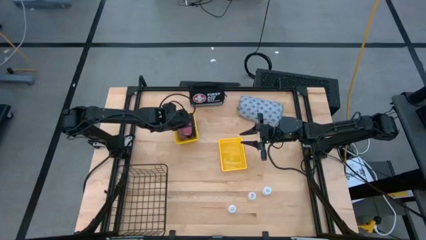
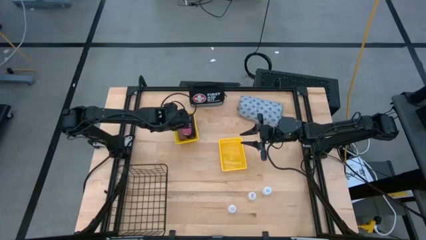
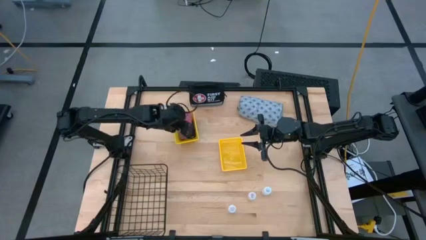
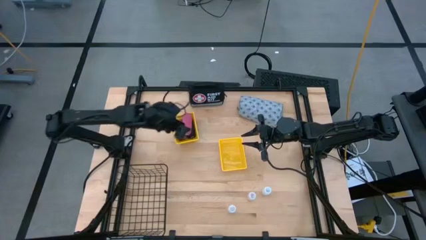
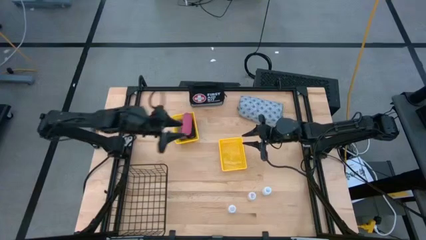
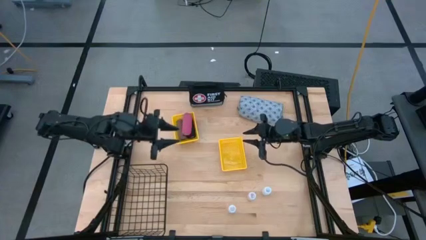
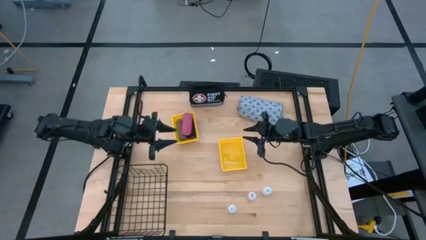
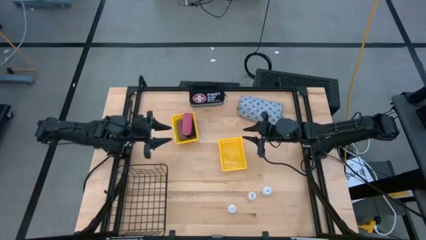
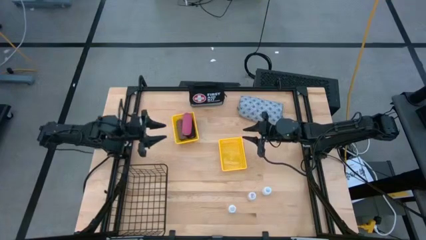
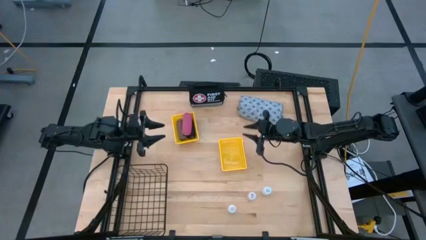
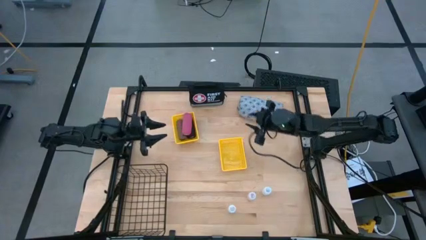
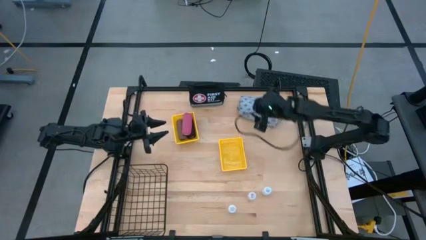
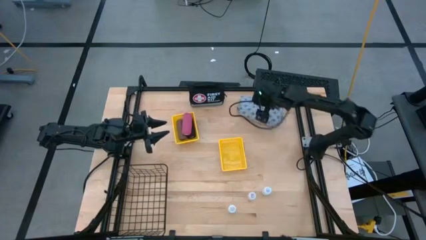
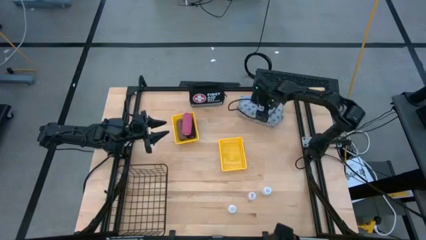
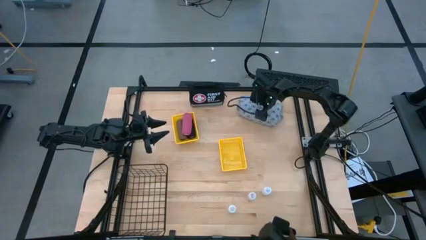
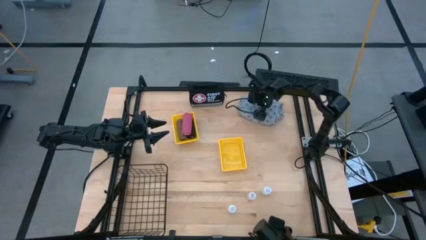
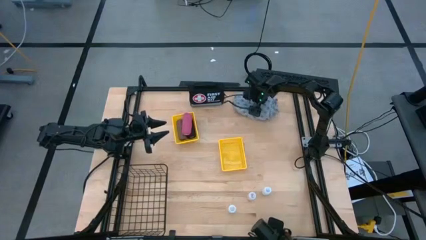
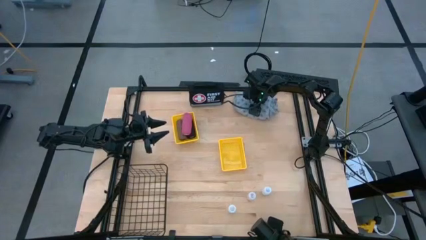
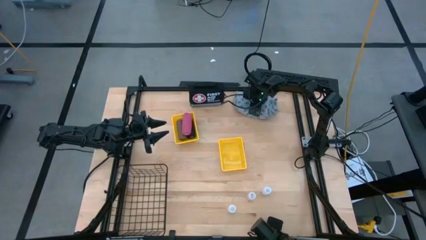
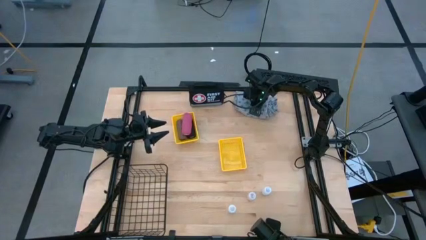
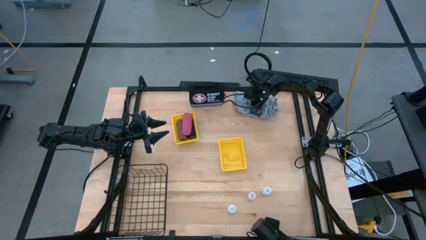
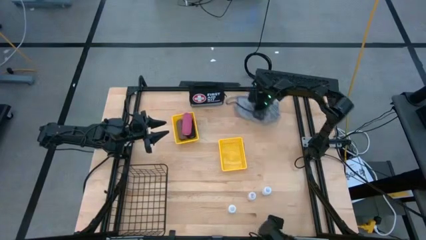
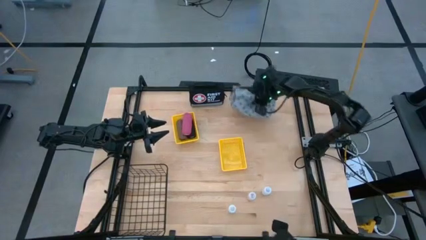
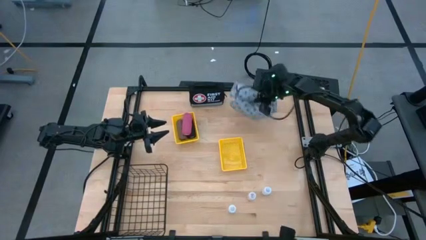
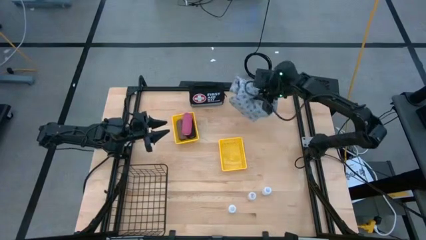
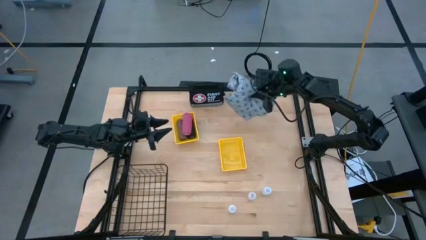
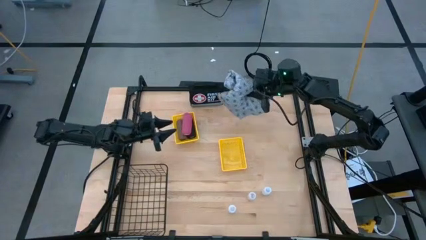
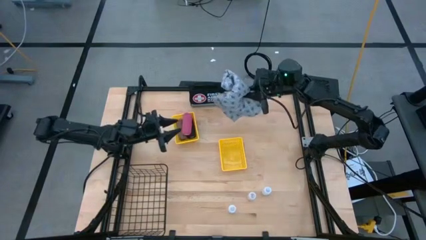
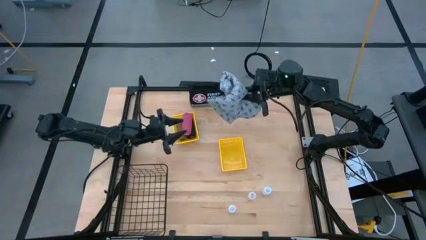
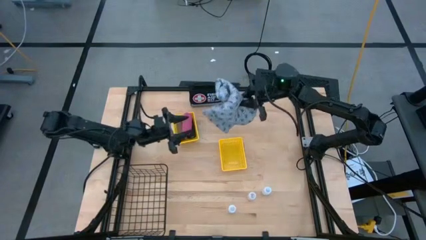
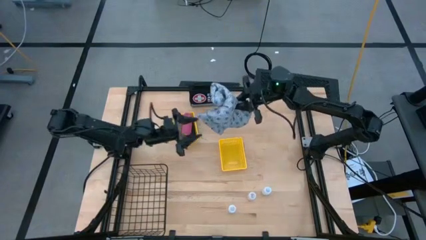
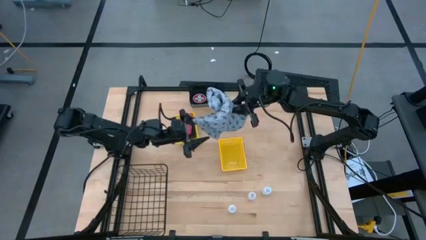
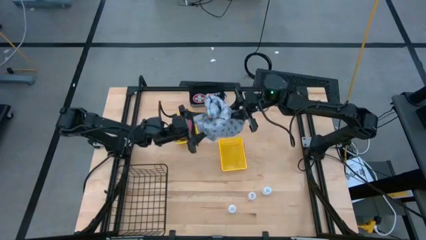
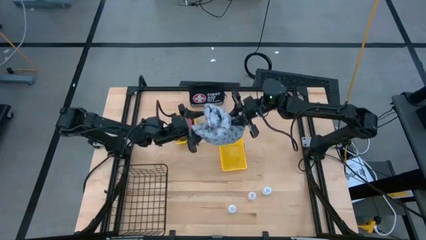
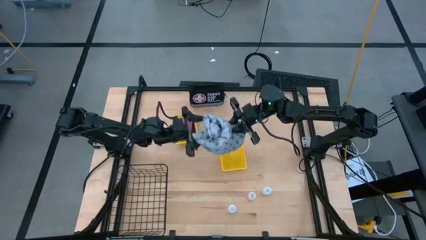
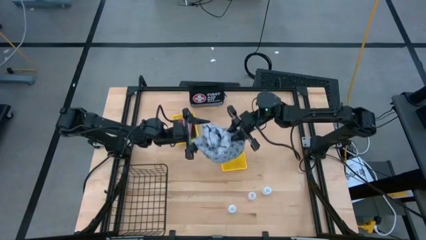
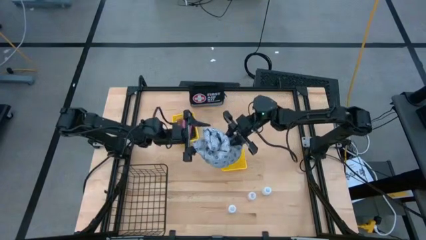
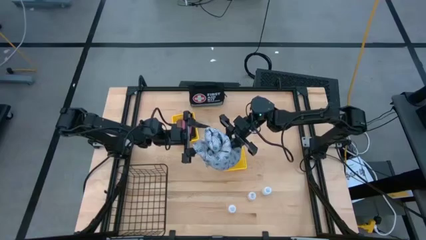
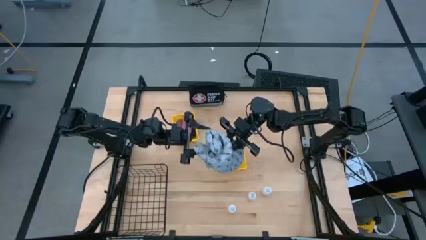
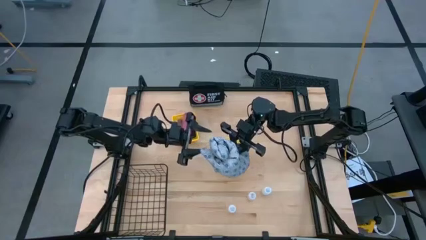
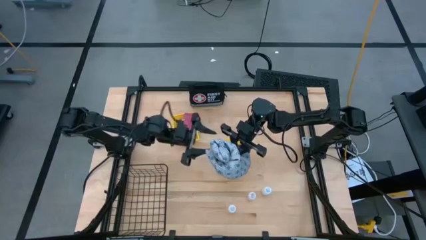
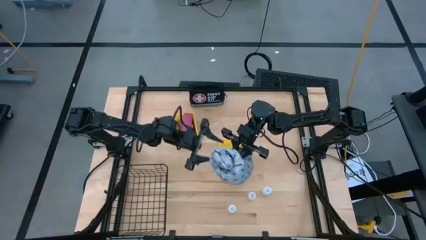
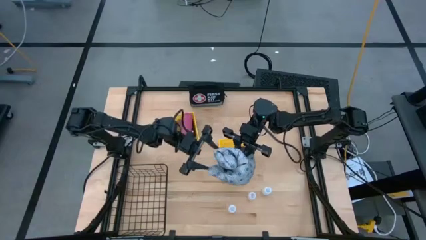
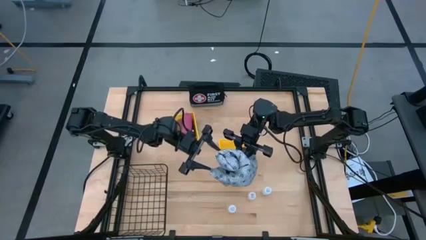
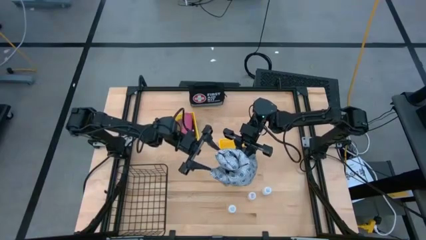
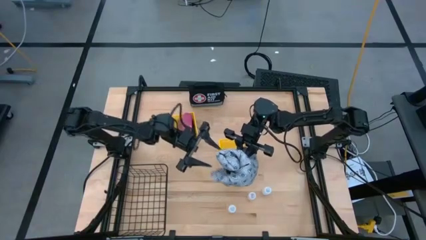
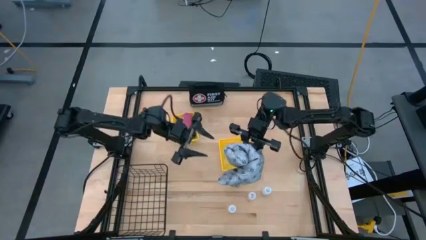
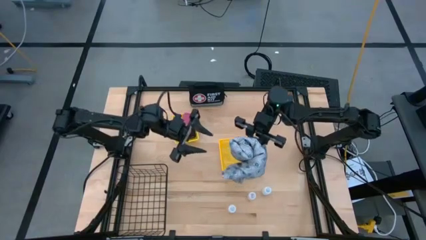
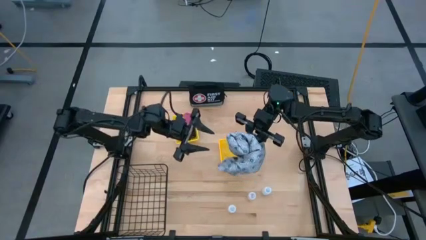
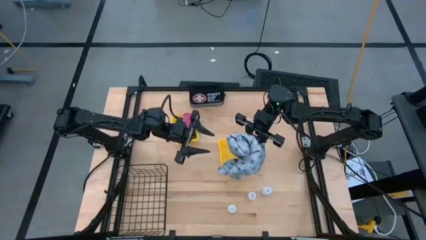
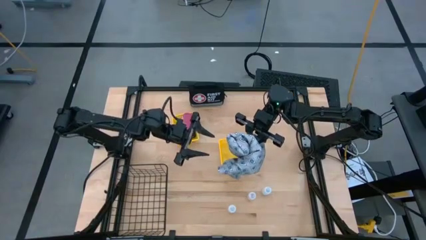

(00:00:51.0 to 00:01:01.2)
Task: Pick & Place Medicine items
Put the blue patient gown into the wire basket
